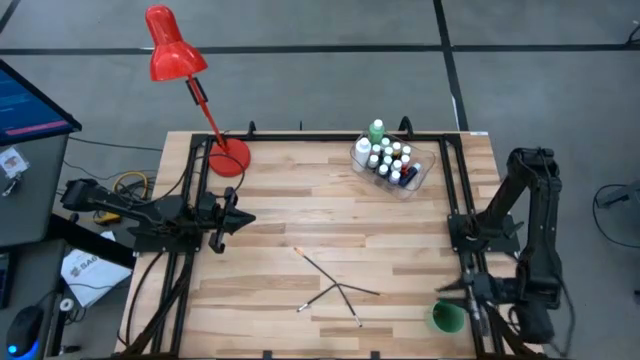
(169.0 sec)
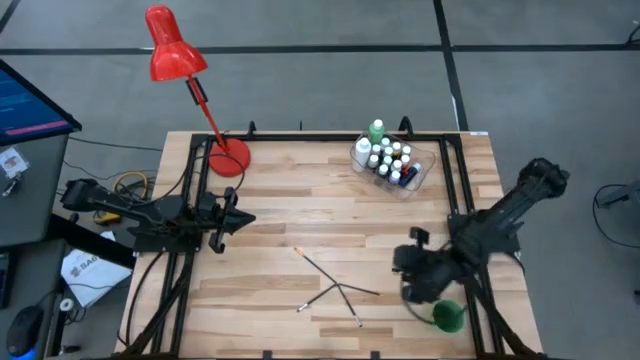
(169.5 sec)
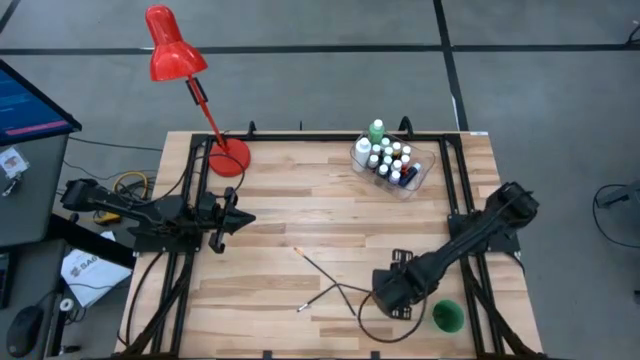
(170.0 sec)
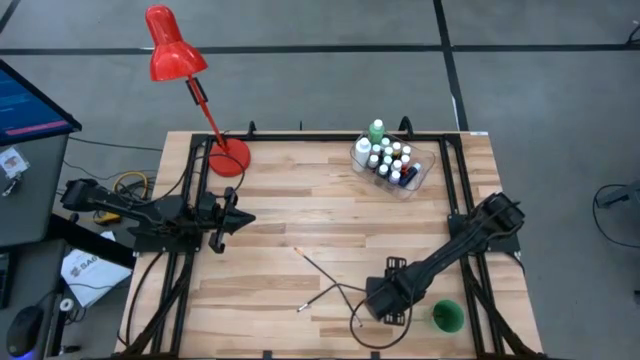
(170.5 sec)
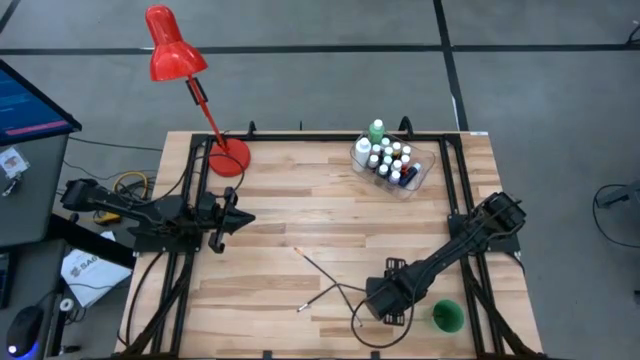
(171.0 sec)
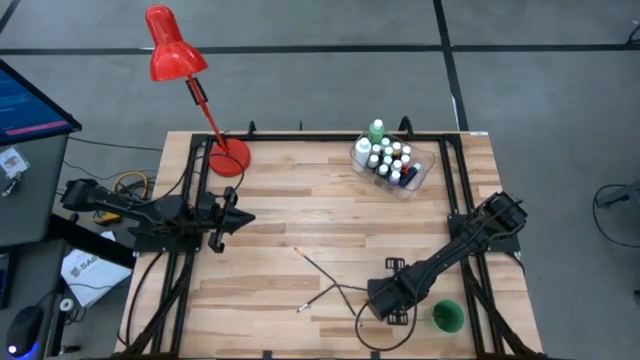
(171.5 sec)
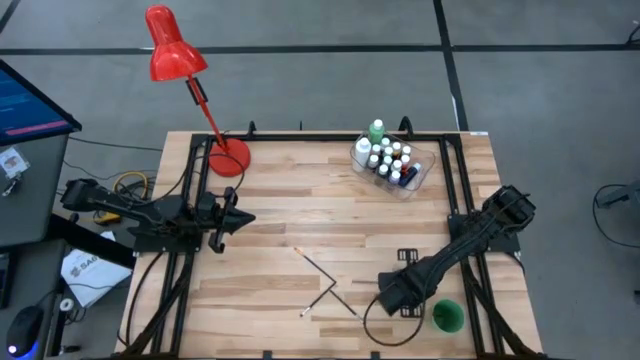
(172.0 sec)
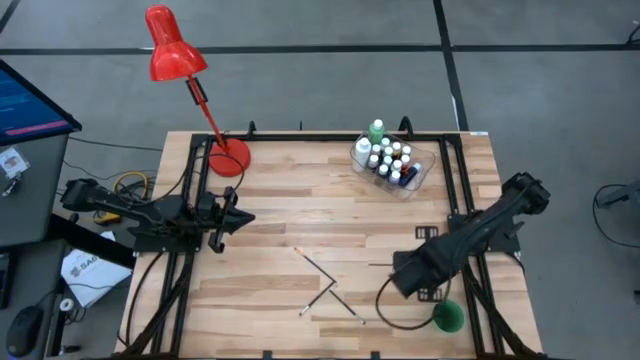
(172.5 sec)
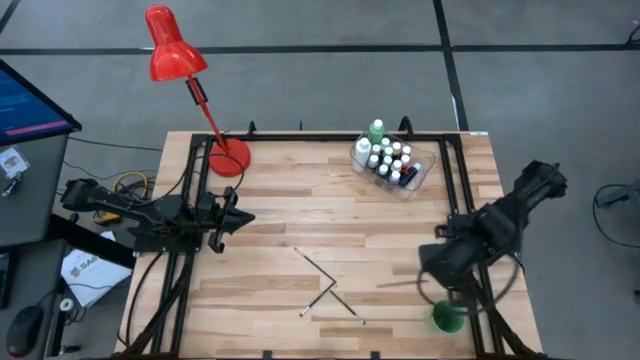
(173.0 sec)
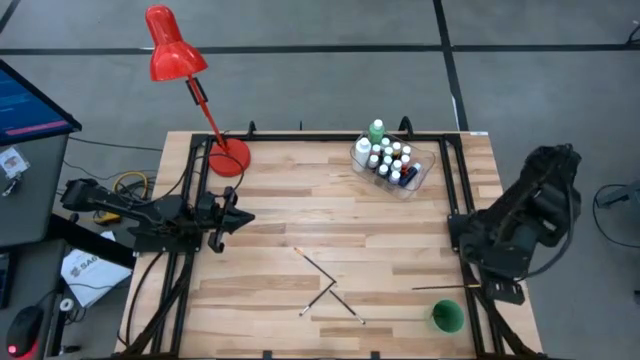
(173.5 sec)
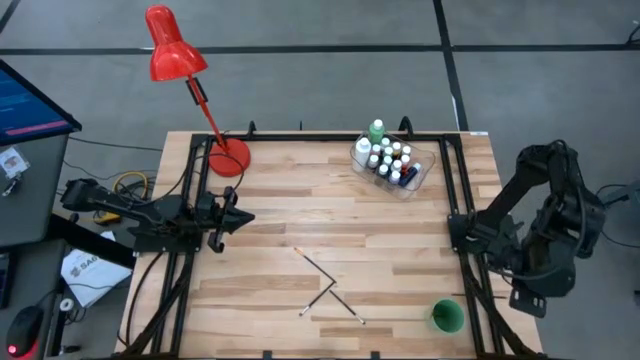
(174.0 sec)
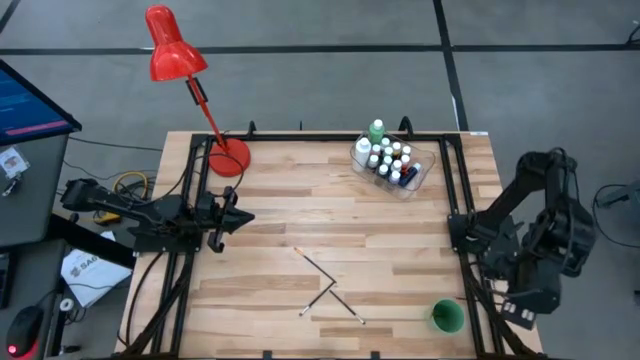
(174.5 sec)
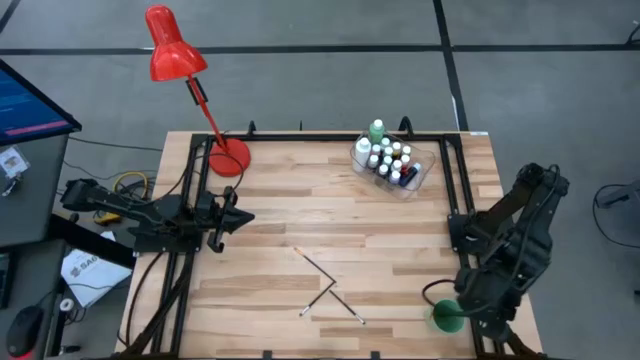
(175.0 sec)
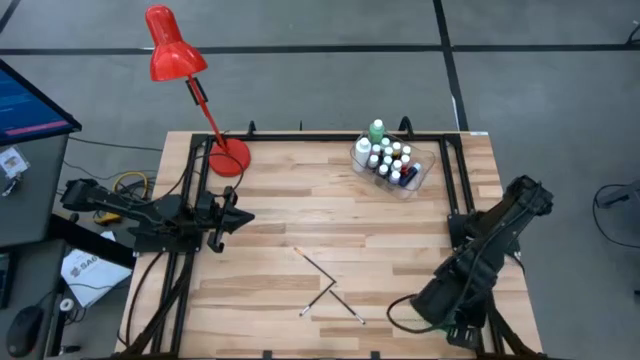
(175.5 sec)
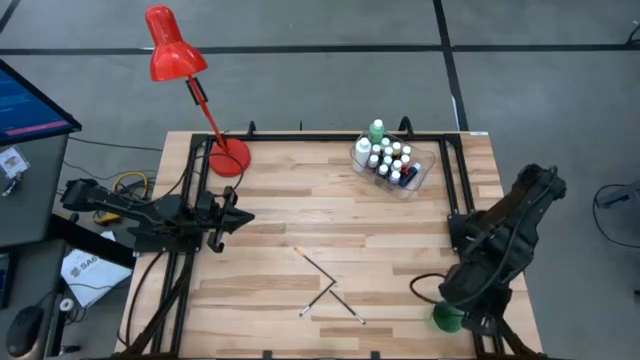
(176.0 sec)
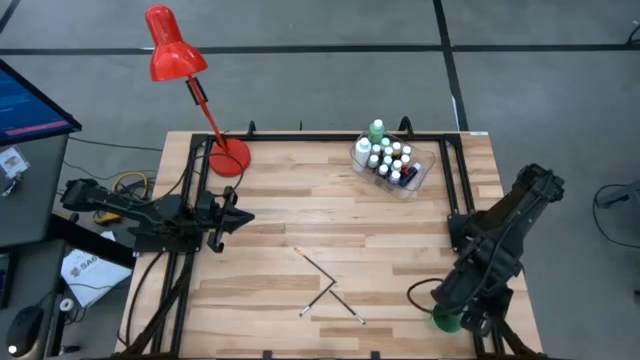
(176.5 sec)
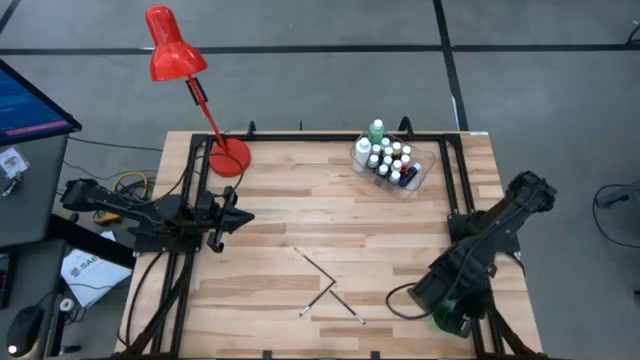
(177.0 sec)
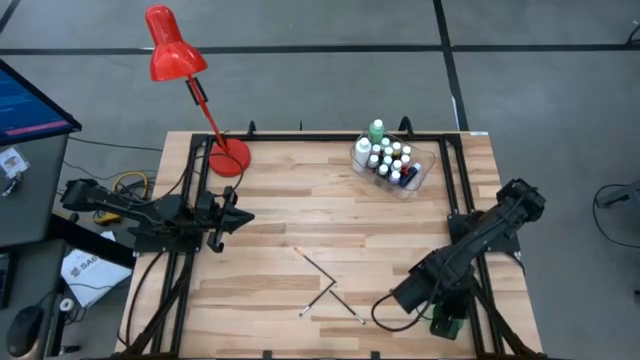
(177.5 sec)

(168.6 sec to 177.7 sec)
Task: Pick & Place Paint Supplies
Put the yellow paint brush into the green cup

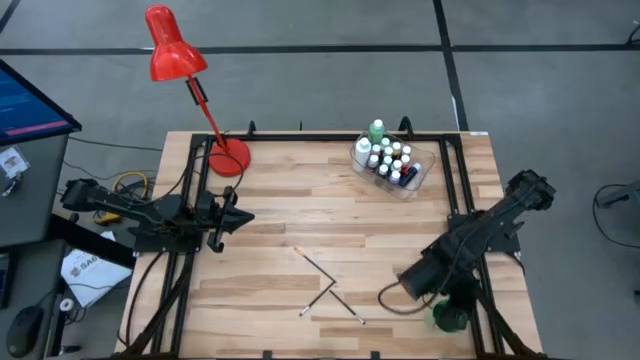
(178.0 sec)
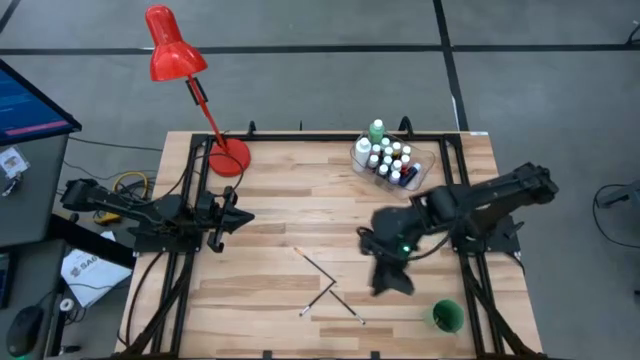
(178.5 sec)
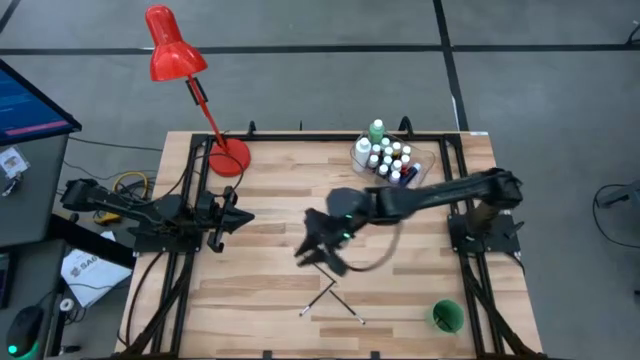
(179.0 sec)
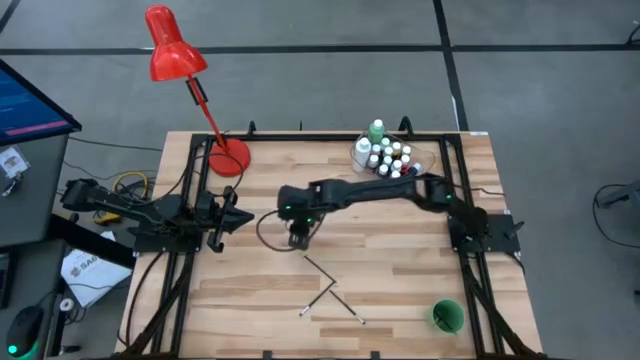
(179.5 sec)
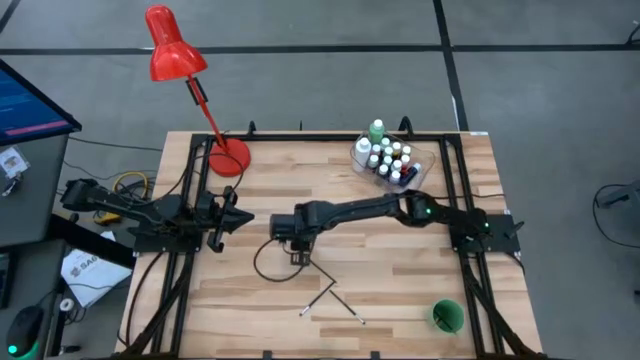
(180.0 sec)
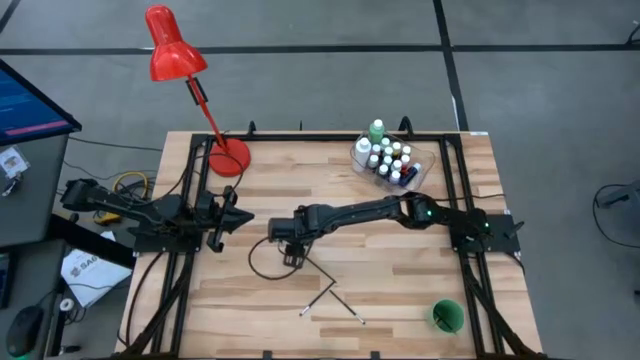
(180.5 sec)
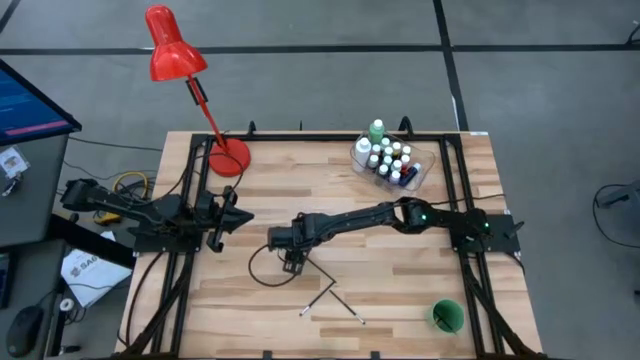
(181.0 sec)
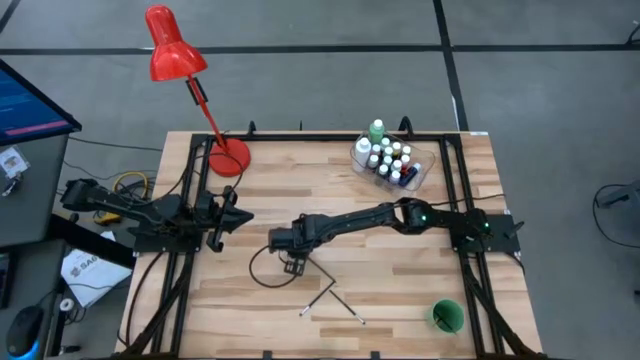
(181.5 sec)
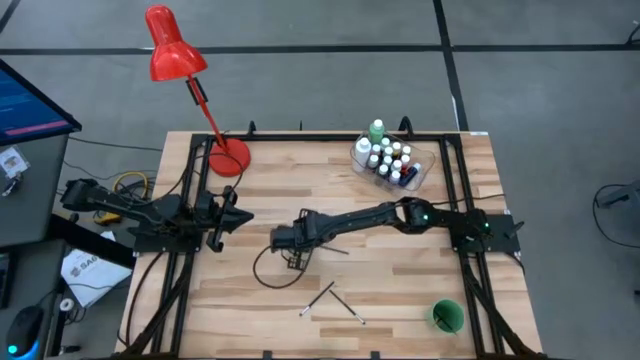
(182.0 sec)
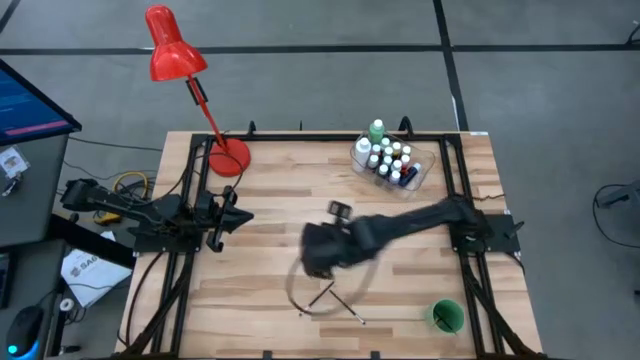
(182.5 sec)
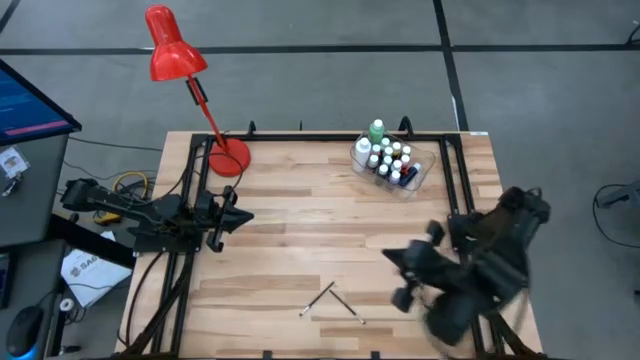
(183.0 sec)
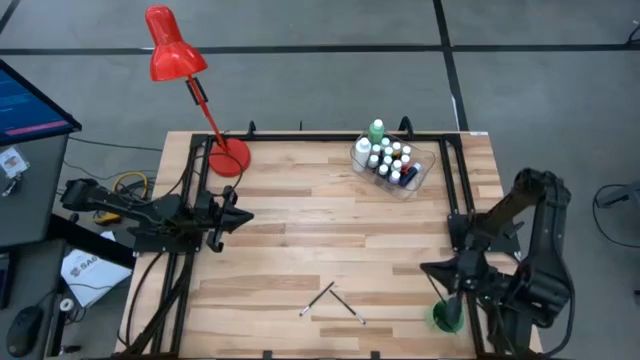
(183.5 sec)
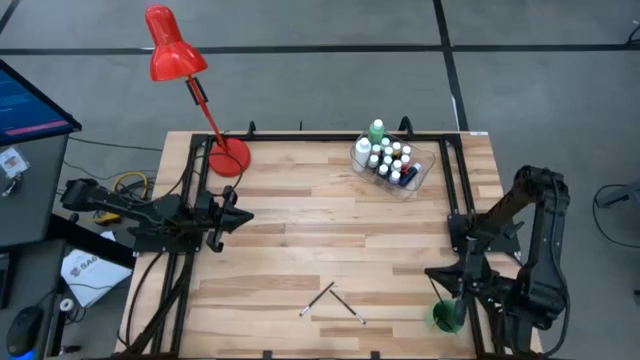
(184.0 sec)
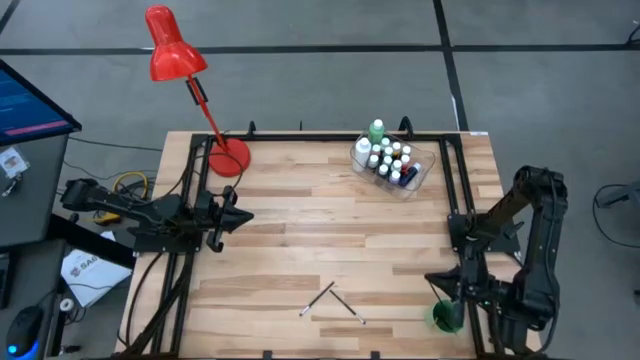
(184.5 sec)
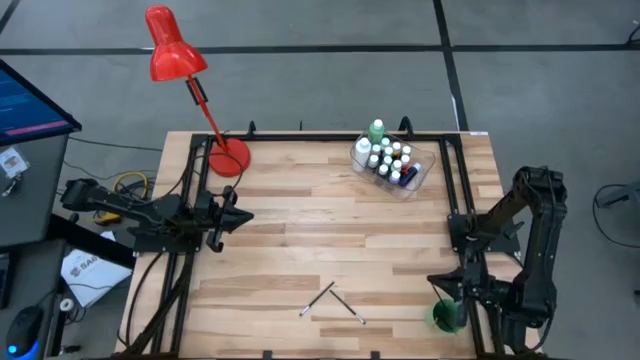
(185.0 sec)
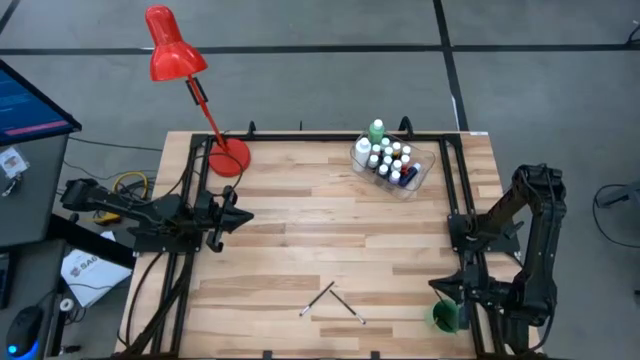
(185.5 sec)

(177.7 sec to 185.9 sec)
Put the yellow paint brush into the green cup

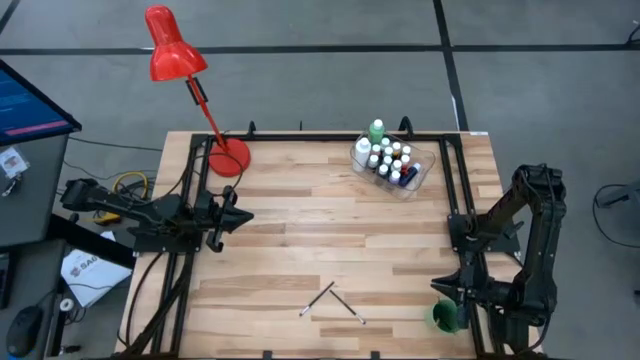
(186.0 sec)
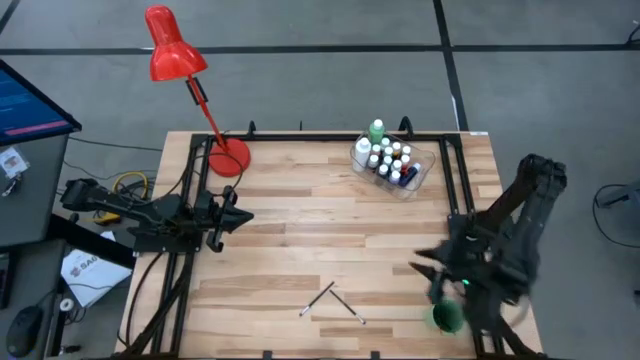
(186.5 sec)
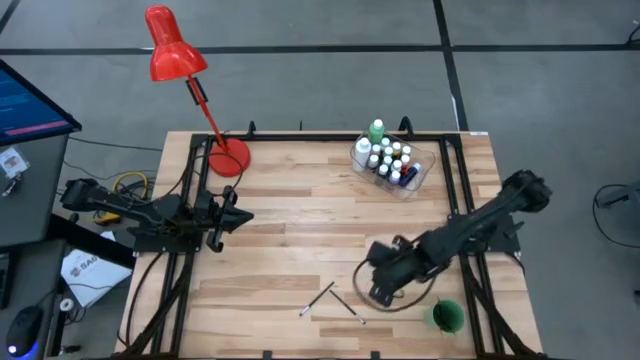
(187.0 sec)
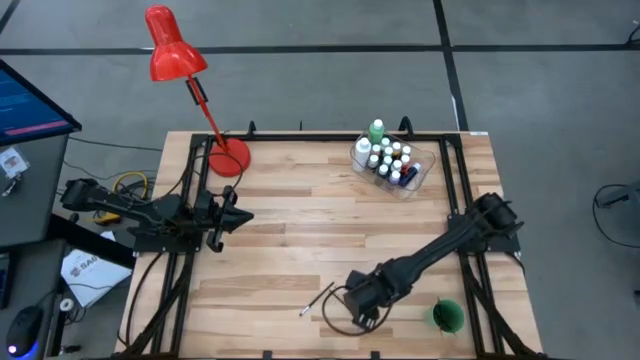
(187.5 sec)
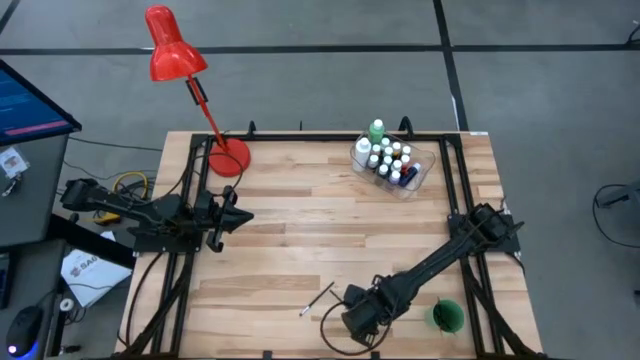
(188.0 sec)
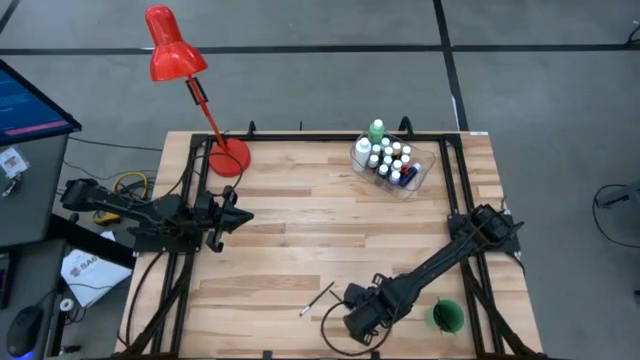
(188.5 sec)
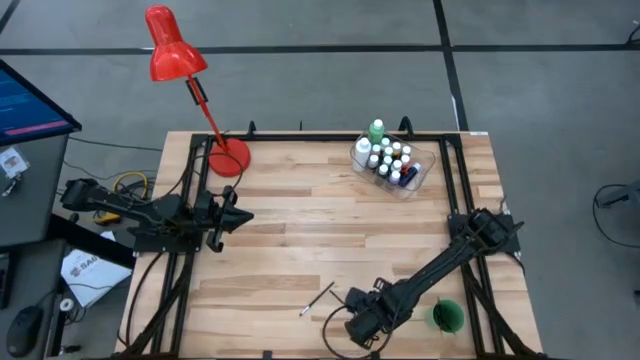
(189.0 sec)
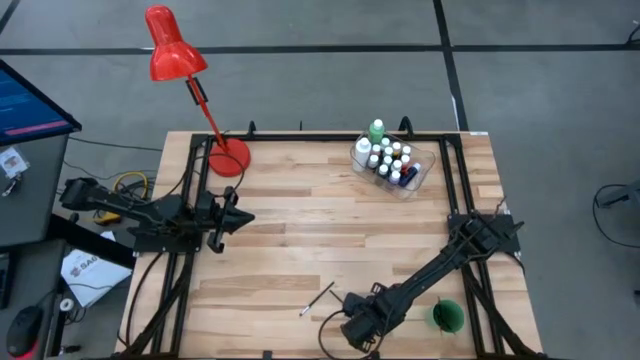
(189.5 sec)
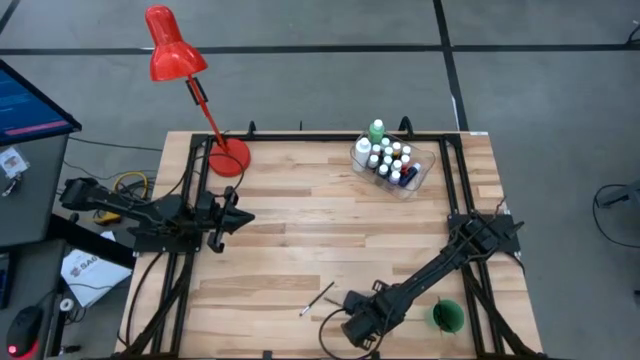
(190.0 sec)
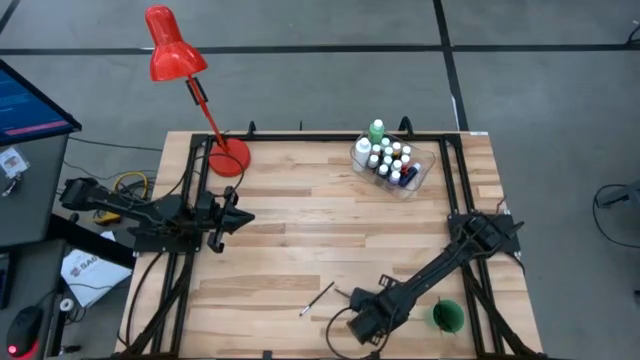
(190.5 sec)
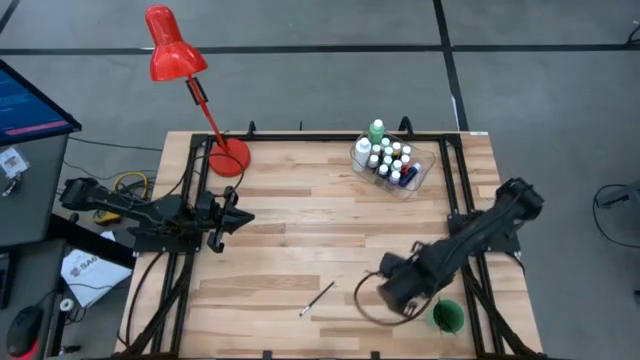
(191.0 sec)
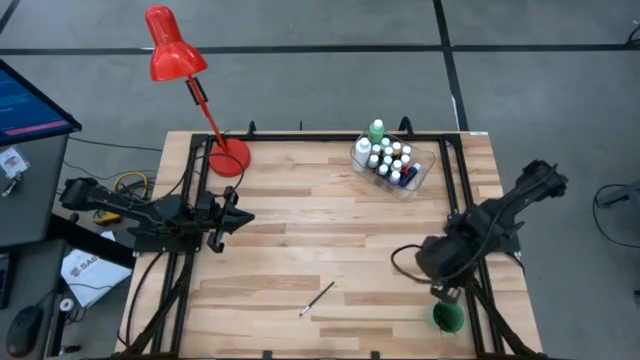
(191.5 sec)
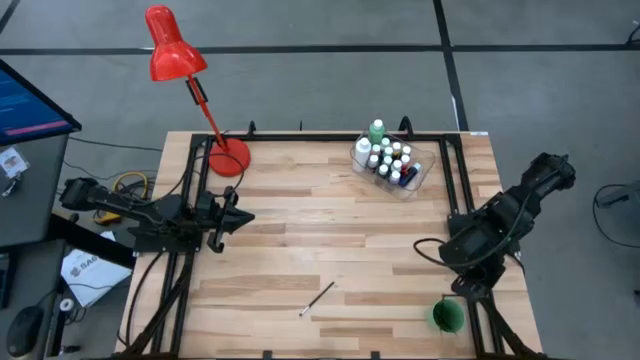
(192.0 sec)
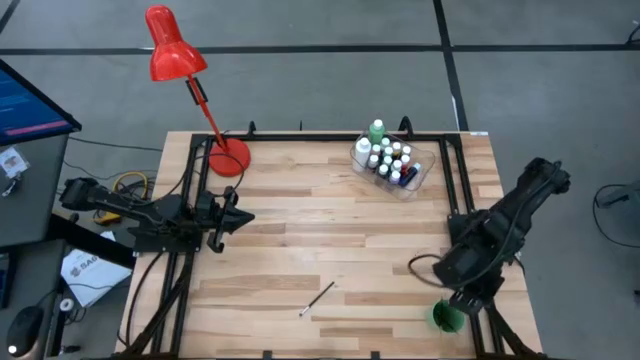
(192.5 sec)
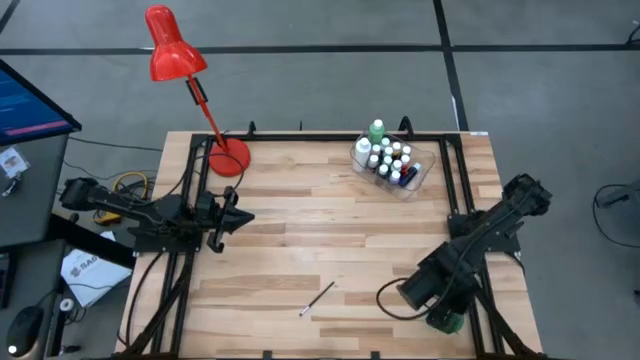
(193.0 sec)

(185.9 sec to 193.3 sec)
Put the white paint brush into the green cup
